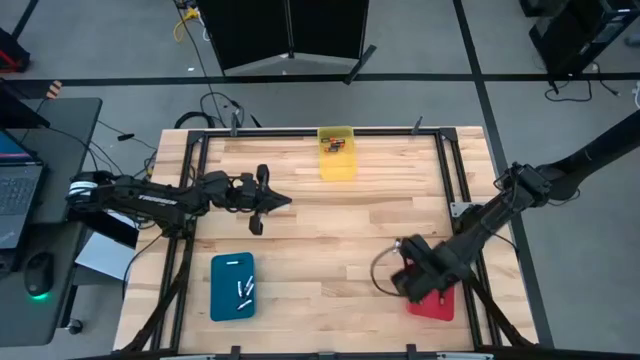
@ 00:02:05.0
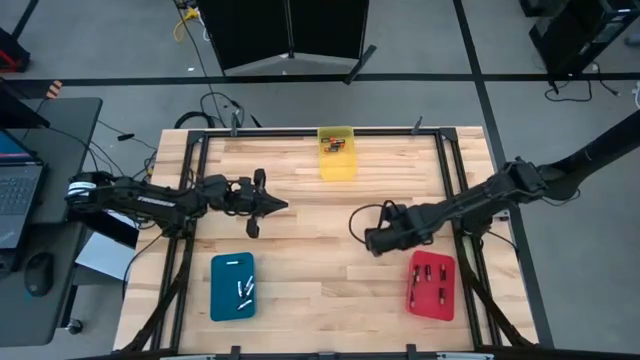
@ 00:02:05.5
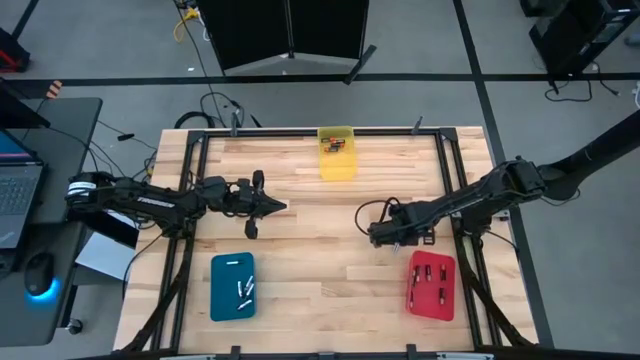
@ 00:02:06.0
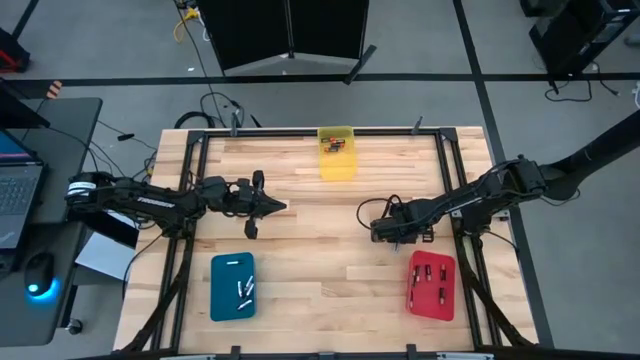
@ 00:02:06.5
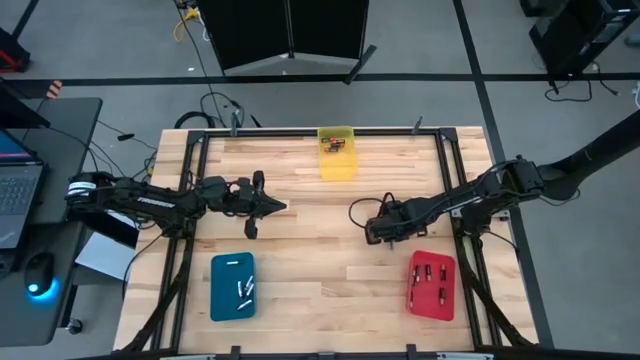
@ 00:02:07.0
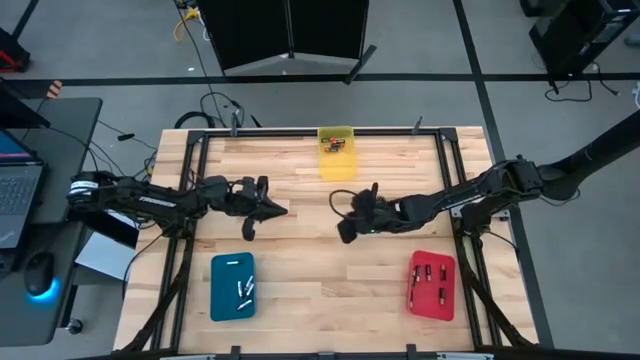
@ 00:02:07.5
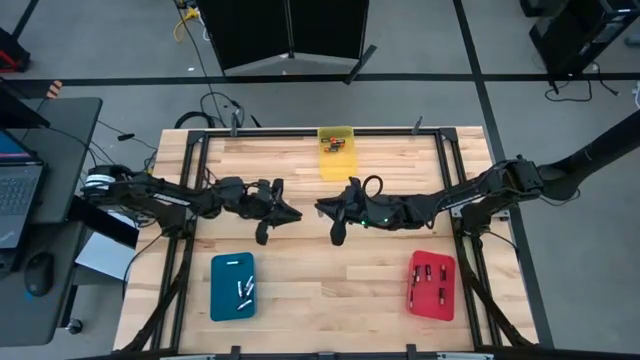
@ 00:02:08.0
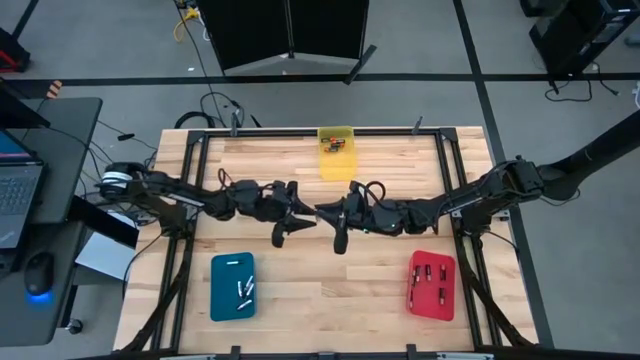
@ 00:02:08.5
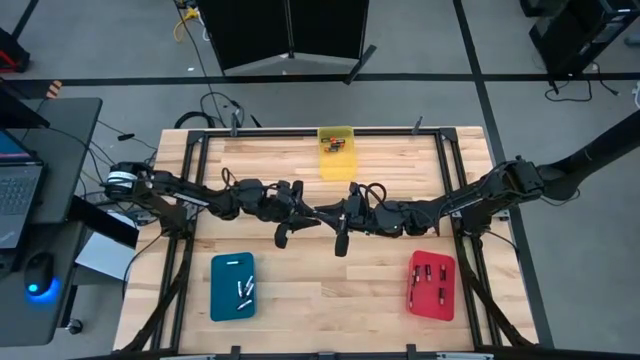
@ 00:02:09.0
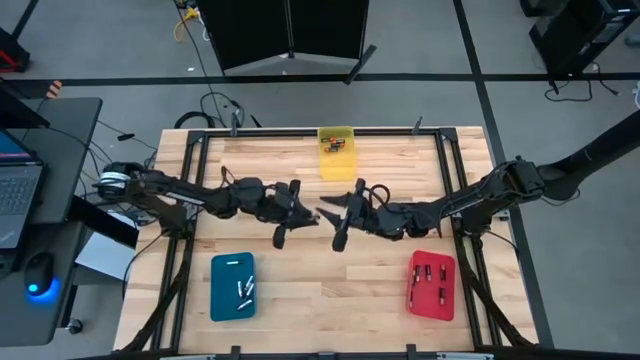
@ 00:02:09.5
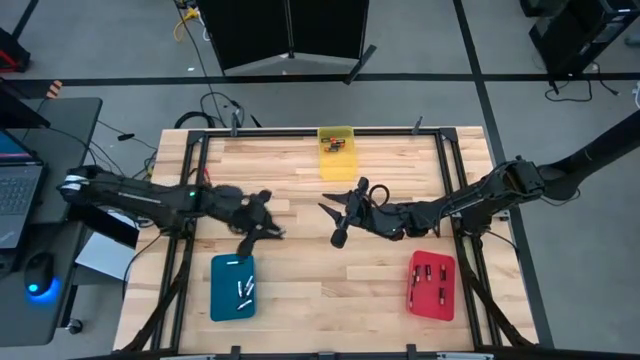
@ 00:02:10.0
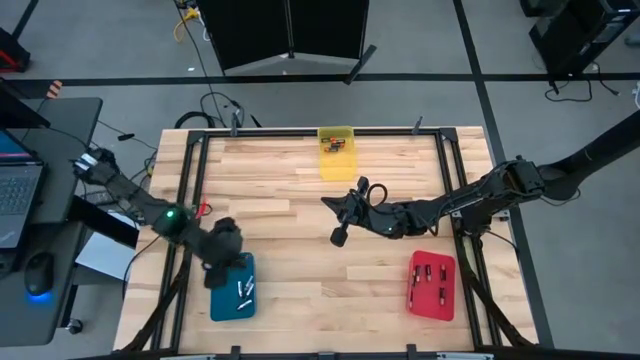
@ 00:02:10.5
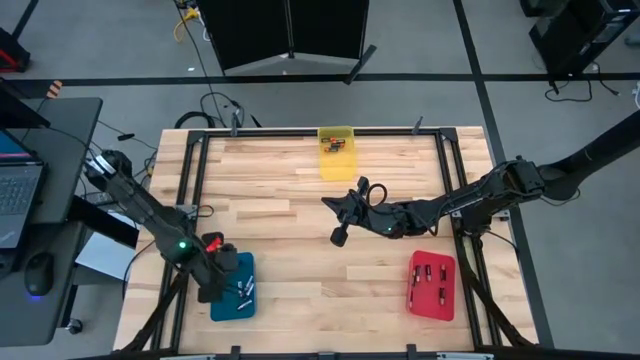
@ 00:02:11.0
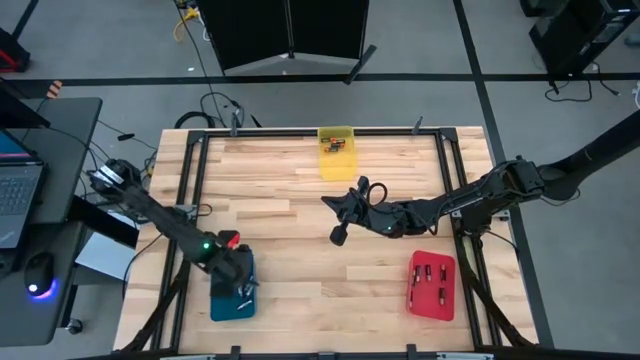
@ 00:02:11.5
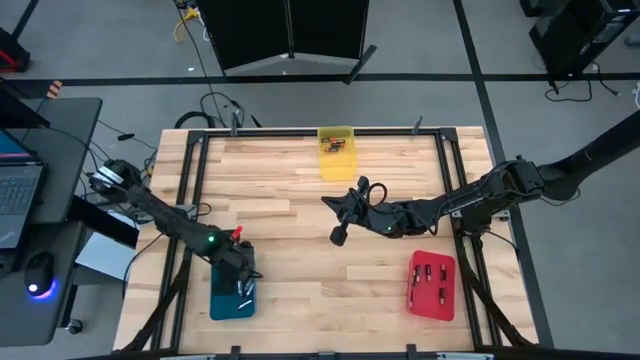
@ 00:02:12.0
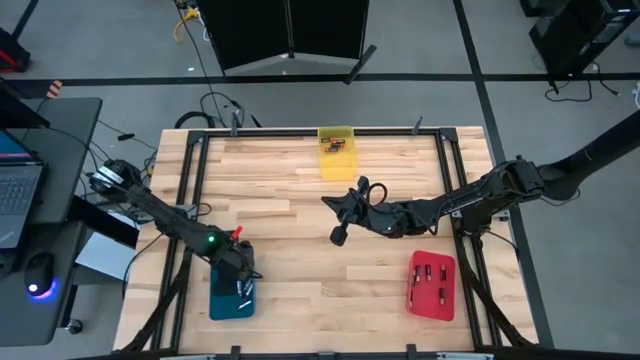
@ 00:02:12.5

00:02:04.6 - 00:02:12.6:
Task: Sort batteries
Put the silver battery into the blue bin

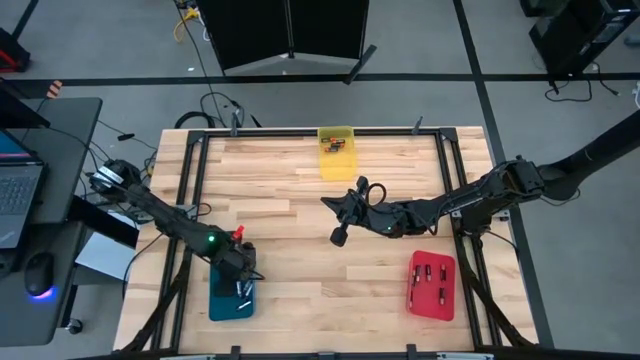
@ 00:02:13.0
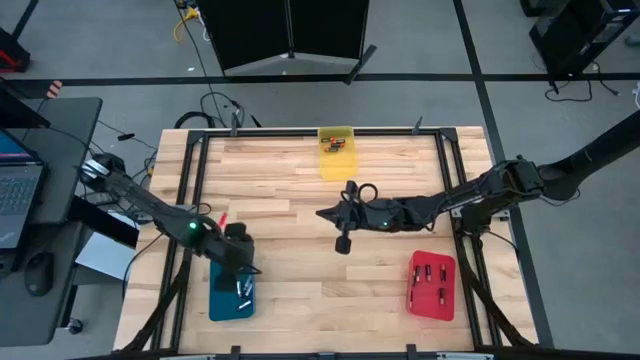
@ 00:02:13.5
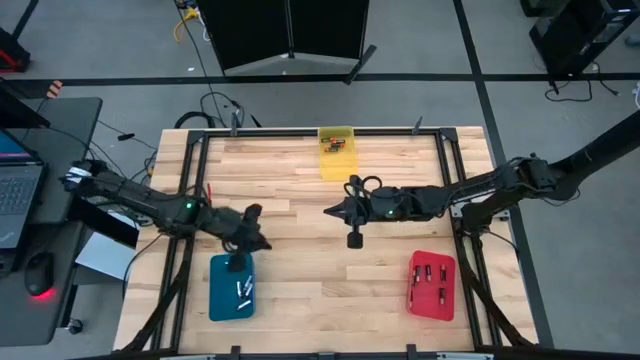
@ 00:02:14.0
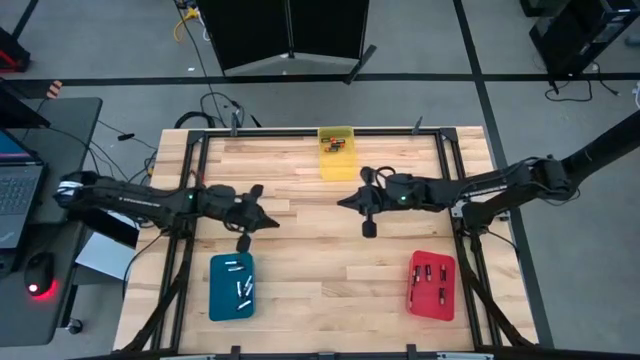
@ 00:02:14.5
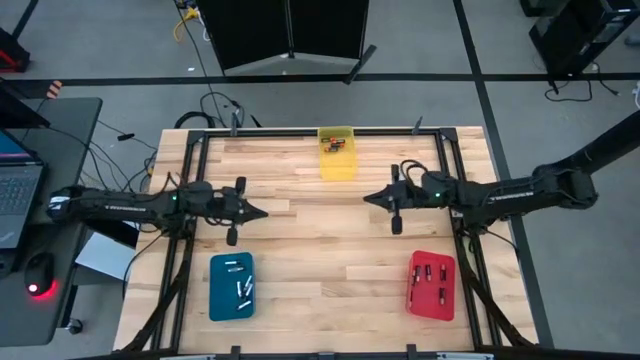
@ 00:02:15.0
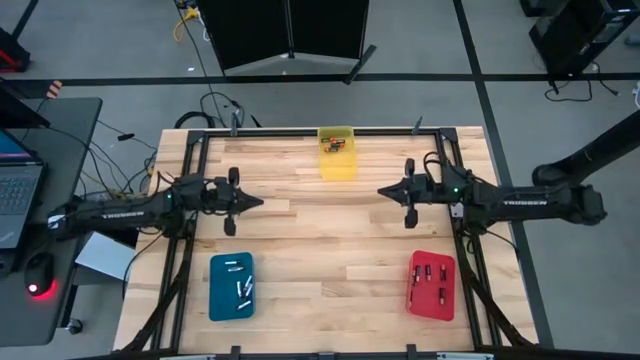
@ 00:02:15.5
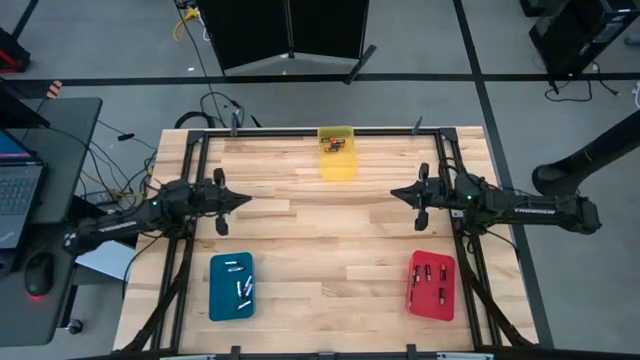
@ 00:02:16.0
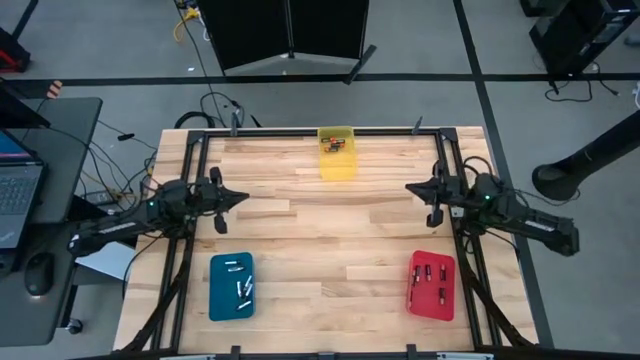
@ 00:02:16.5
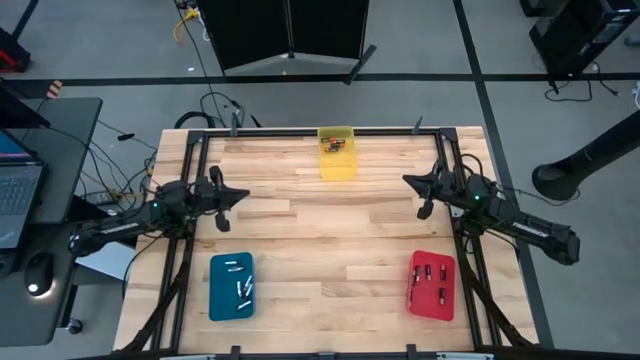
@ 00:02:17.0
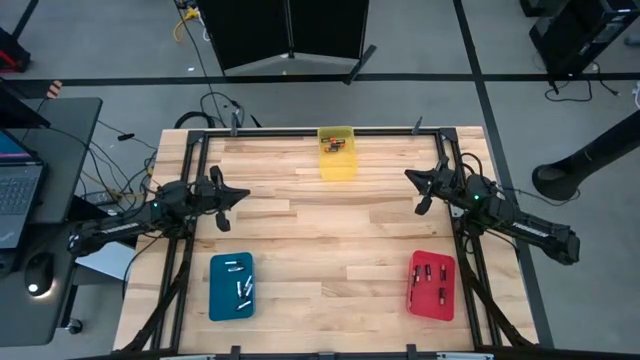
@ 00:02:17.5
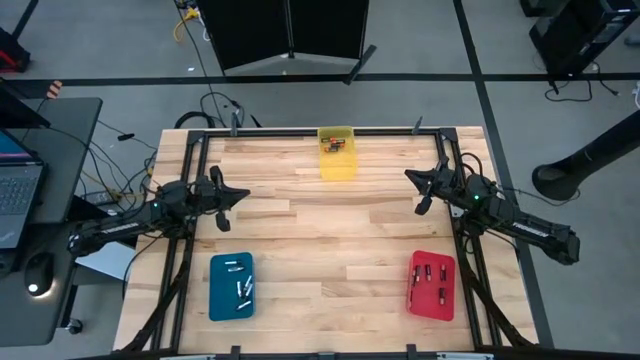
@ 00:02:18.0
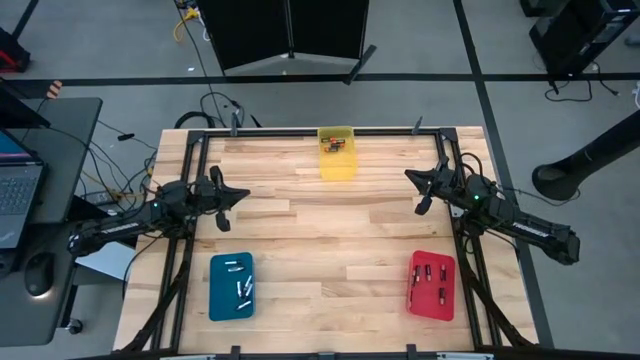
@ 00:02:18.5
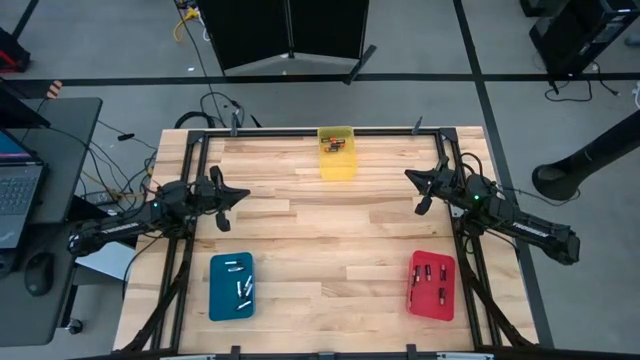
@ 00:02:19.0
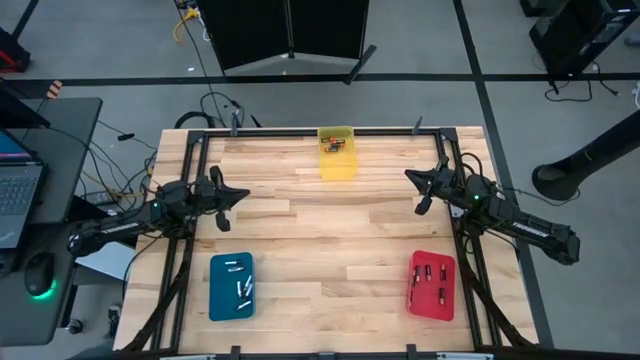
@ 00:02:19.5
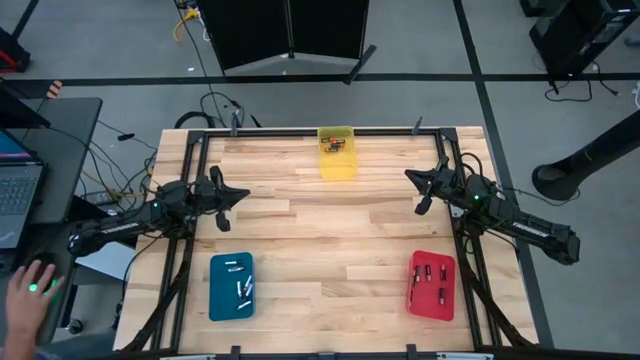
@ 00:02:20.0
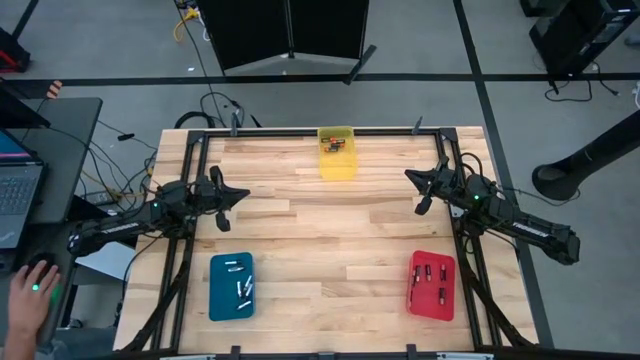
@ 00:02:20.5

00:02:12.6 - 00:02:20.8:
Return to Home Position

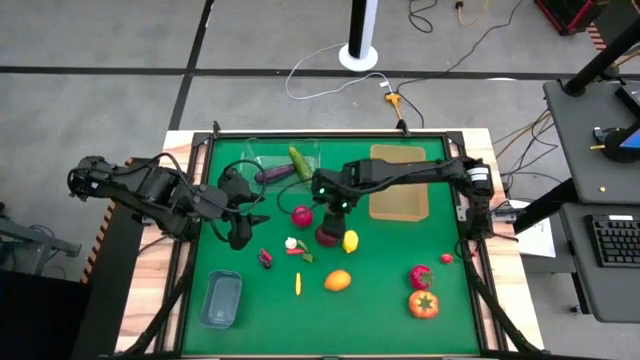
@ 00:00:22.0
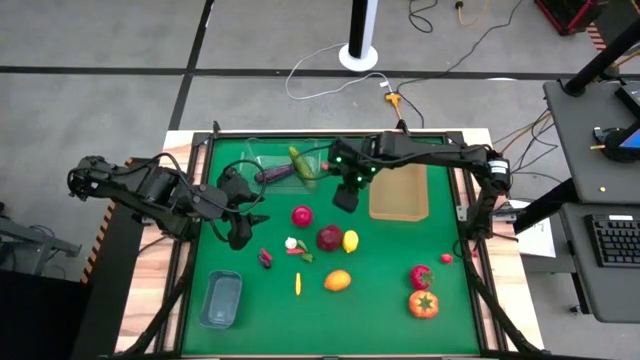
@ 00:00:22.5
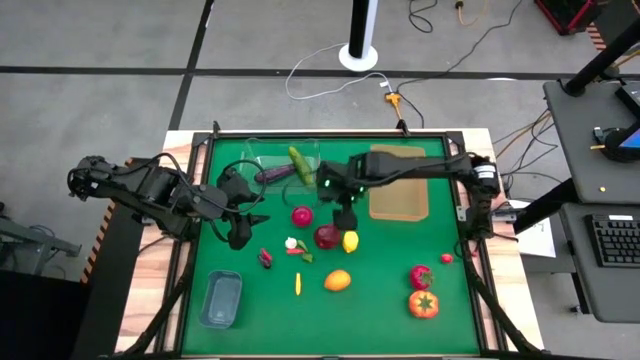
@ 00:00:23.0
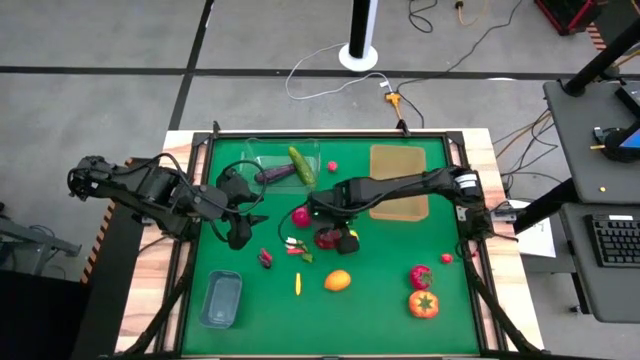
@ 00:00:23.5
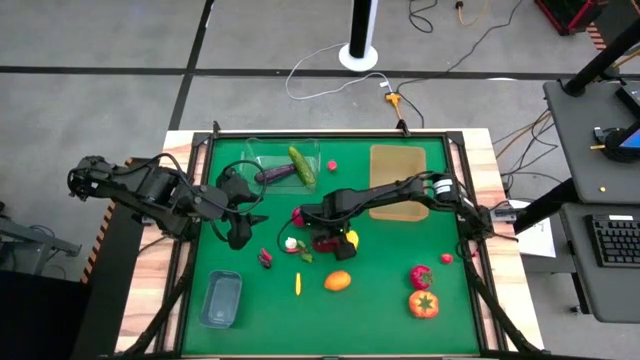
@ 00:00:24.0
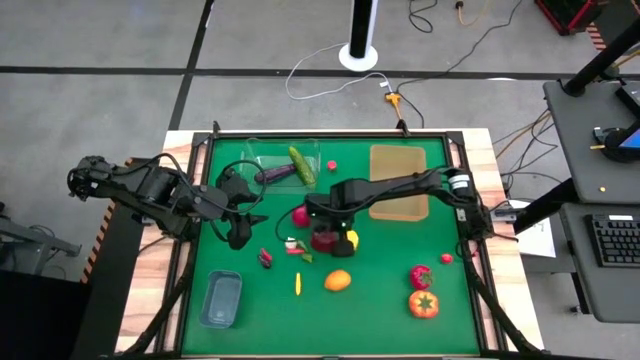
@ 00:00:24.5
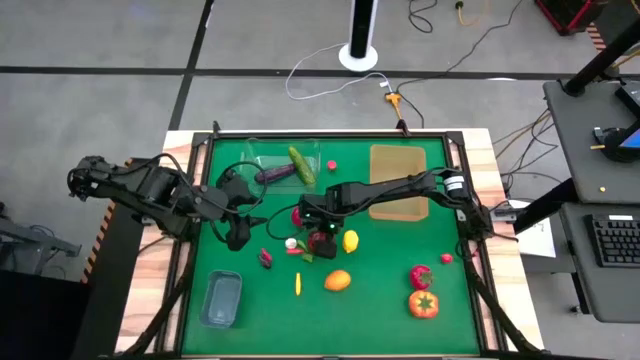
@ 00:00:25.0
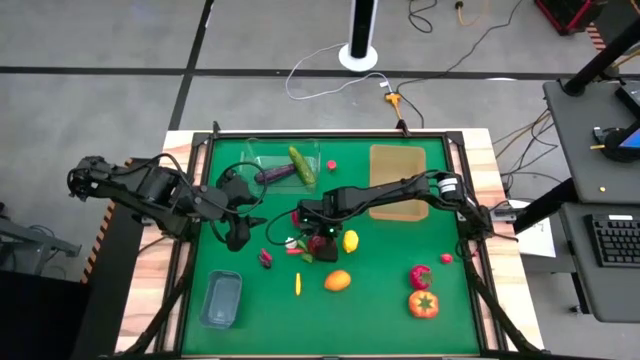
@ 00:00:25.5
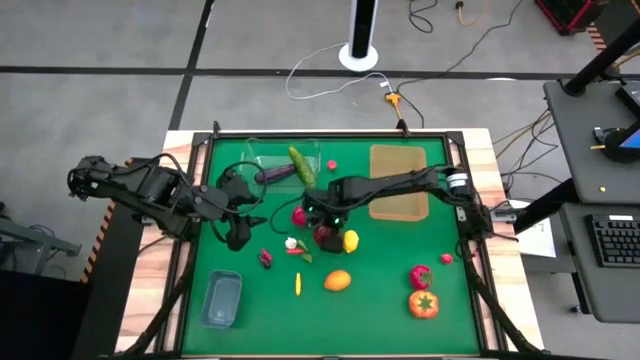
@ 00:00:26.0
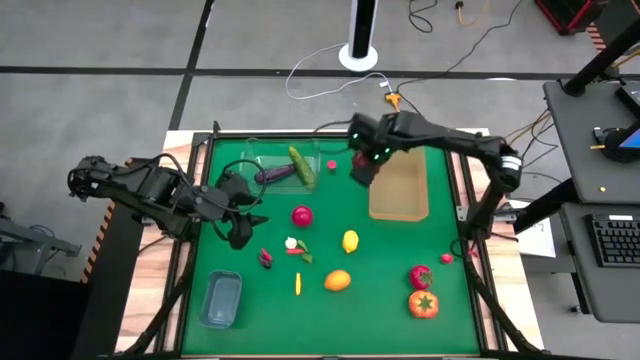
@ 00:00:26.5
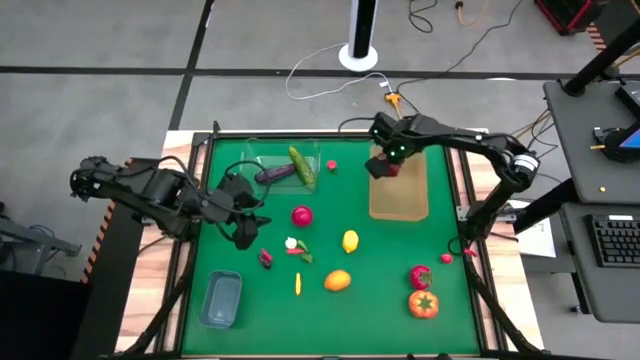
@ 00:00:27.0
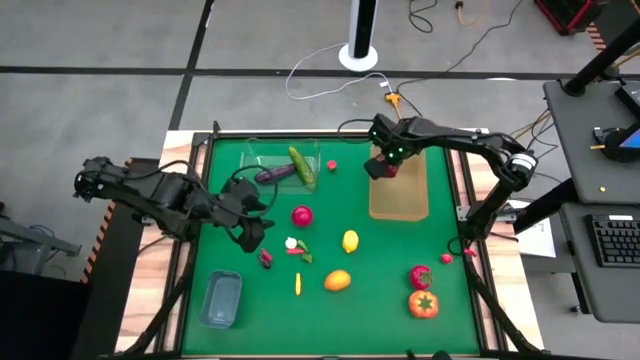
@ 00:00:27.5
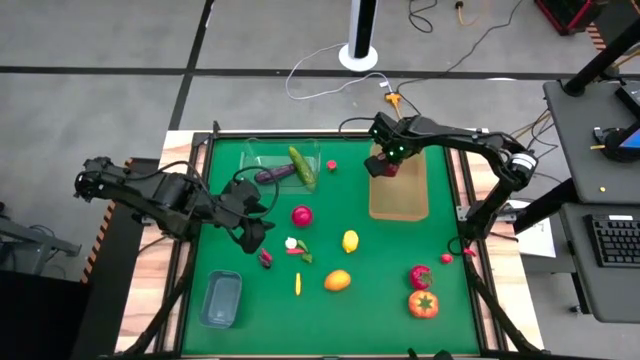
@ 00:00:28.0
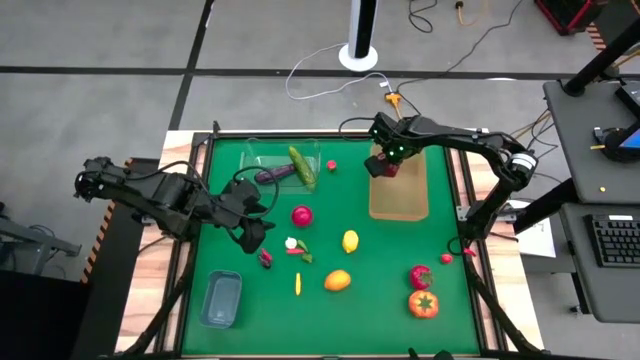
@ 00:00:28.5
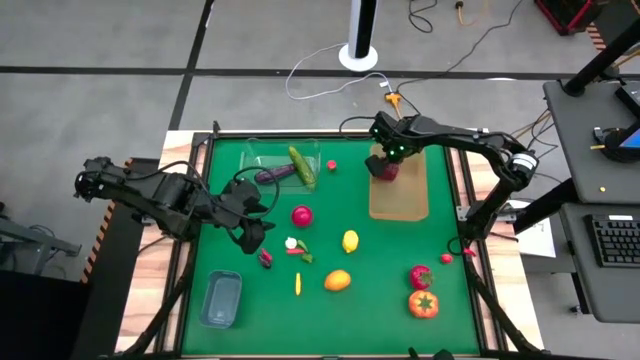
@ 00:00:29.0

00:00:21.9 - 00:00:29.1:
Task: Sort produce into baskets
Put the red apple into the orange bin
